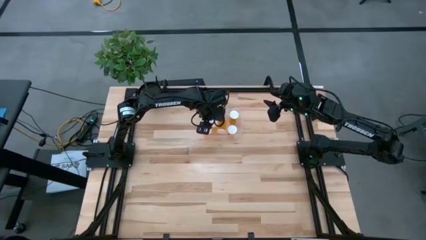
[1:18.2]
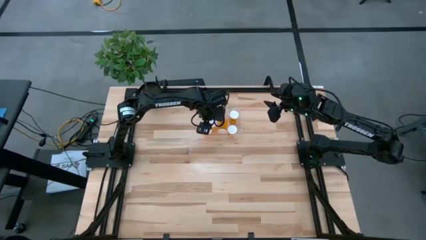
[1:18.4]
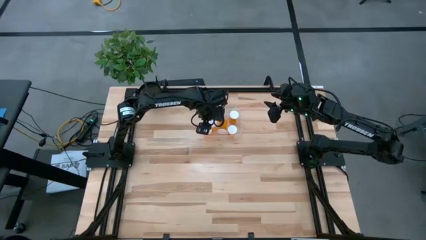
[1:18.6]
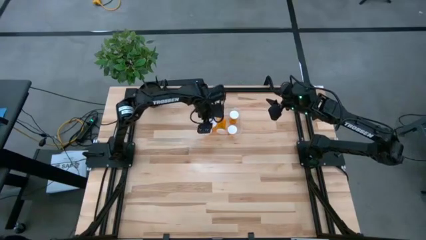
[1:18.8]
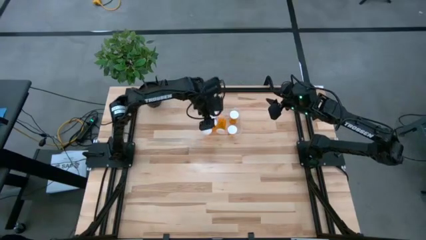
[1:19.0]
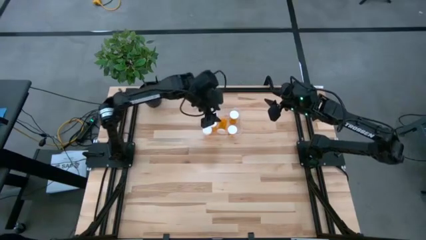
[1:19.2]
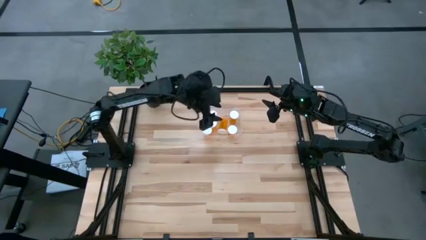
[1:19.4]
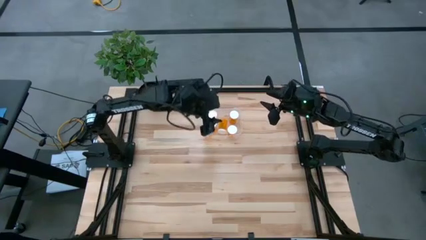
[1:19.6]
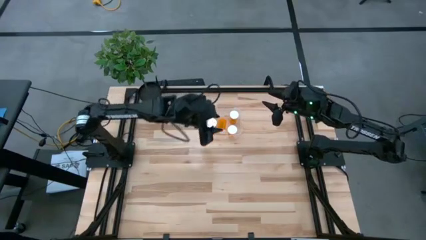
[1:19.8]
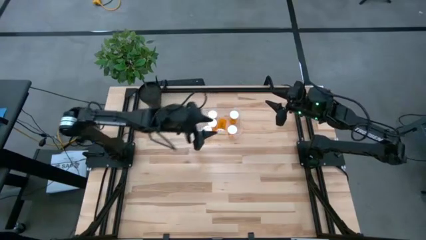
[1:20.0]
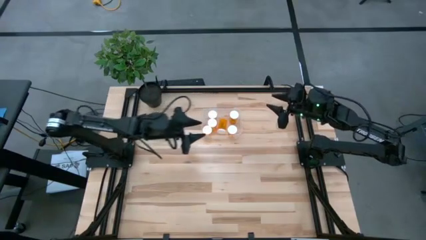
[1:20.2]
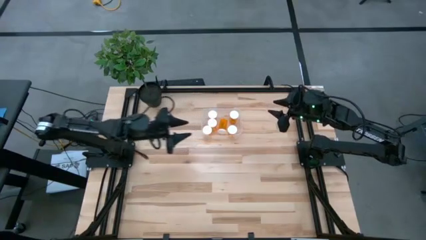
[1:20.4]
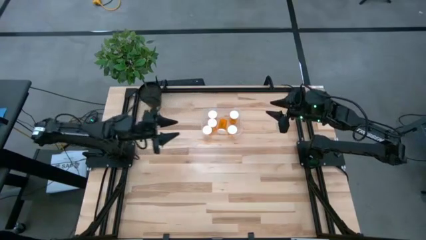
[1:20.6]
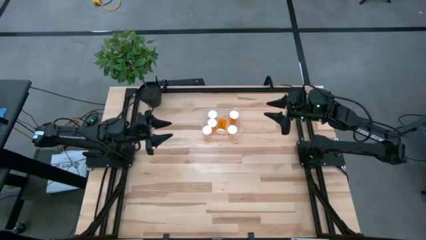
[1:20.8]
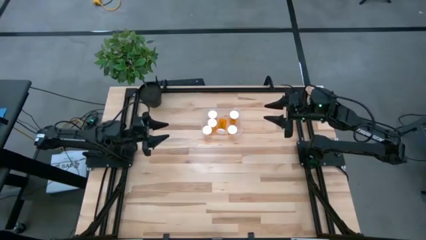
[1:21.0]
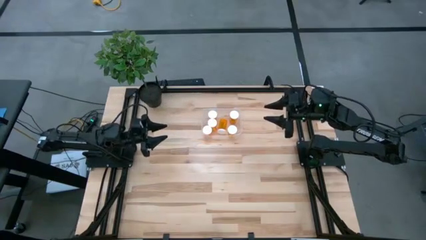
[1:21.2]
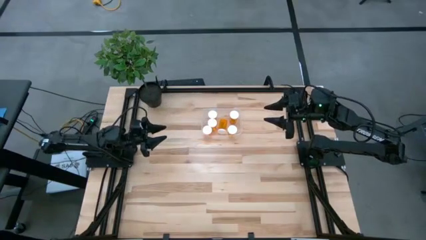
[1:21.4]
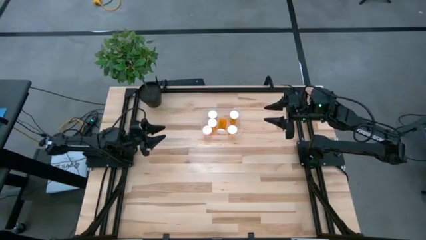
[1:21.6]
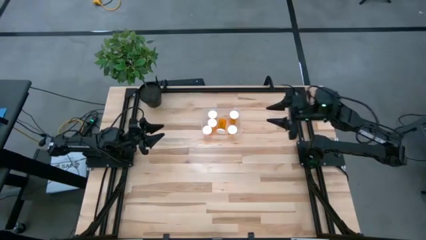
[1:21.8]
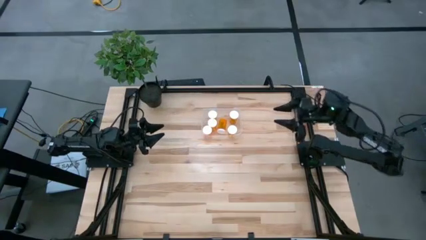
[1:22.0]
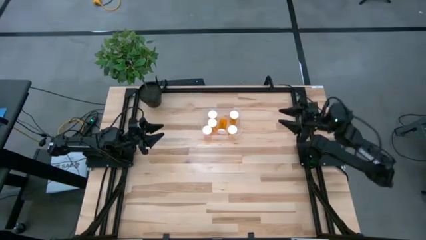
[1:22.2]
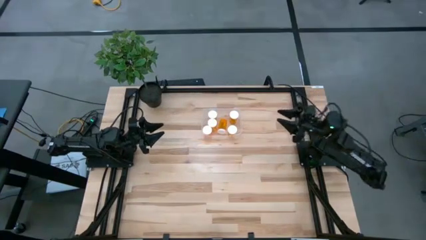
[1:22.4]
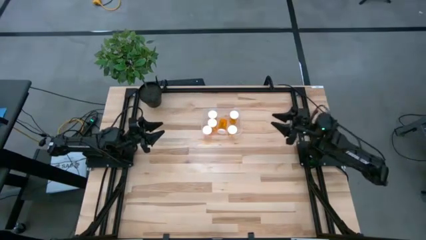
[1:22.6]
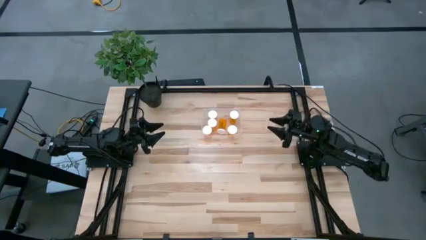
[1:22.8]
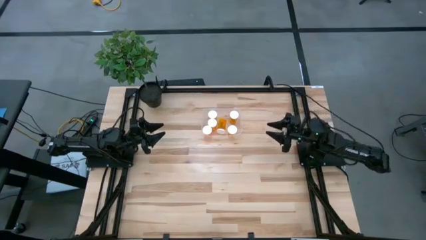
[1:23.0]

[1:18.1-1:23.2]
Task: Pick and place pill bottles into a basket
Return to Home Position

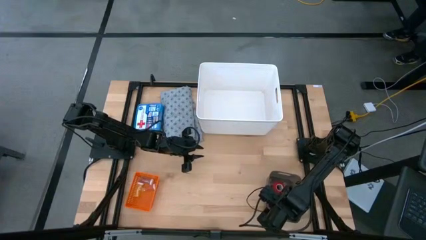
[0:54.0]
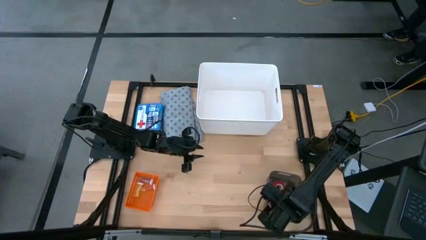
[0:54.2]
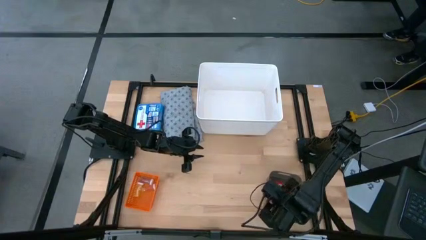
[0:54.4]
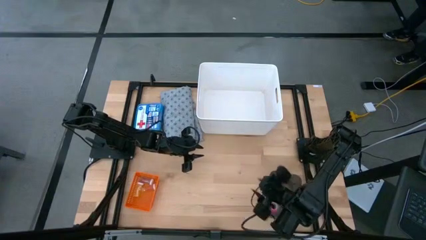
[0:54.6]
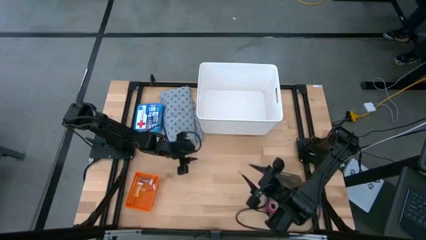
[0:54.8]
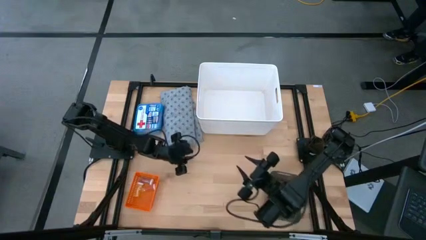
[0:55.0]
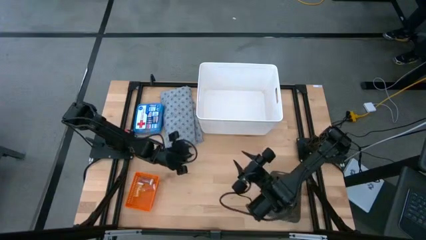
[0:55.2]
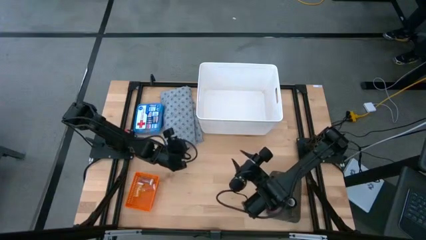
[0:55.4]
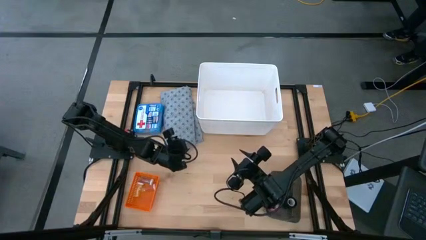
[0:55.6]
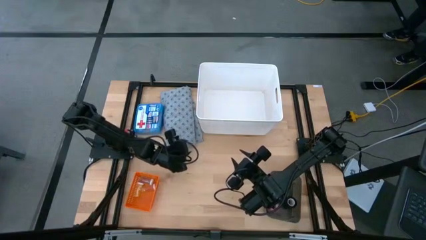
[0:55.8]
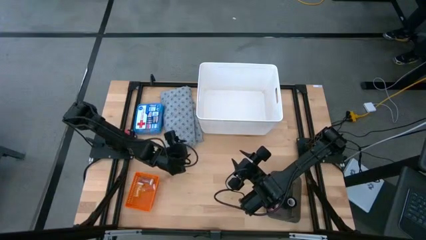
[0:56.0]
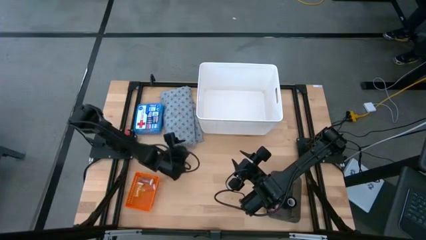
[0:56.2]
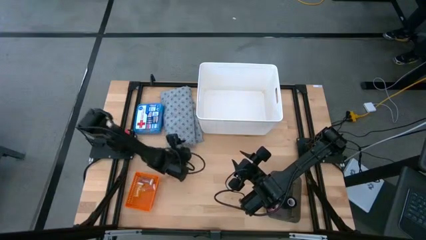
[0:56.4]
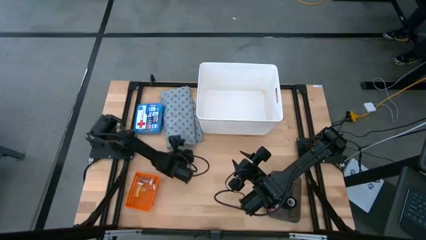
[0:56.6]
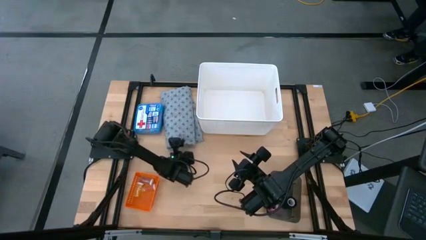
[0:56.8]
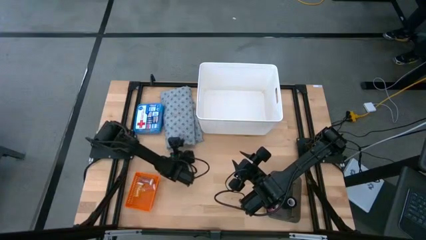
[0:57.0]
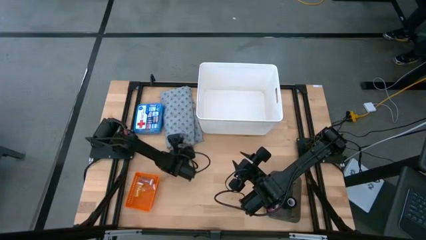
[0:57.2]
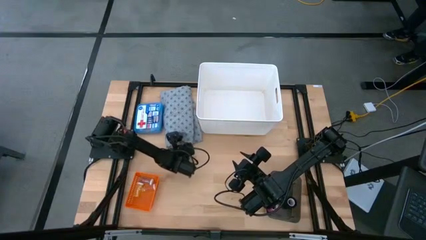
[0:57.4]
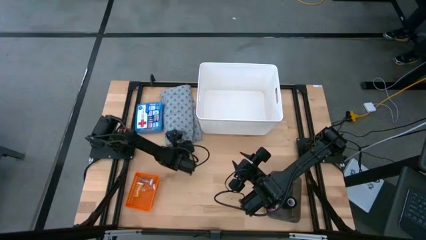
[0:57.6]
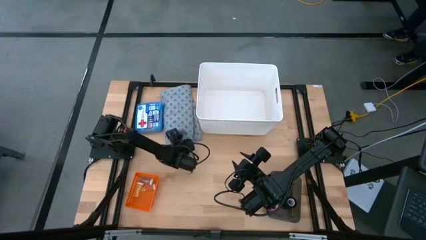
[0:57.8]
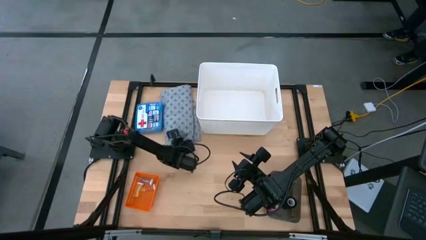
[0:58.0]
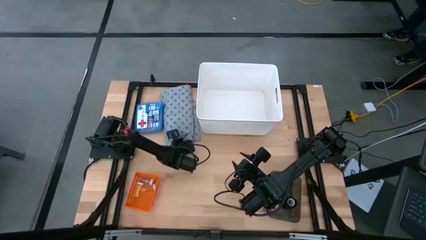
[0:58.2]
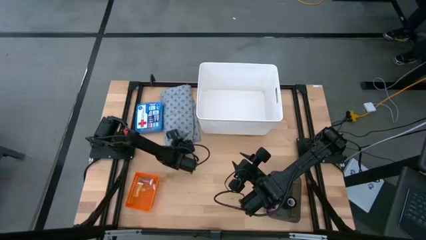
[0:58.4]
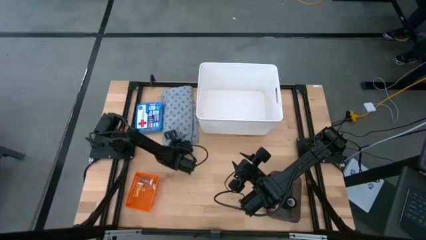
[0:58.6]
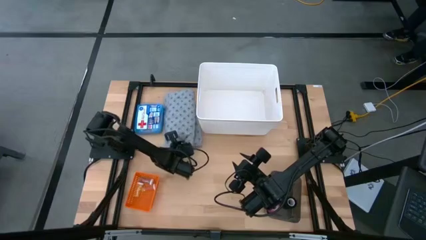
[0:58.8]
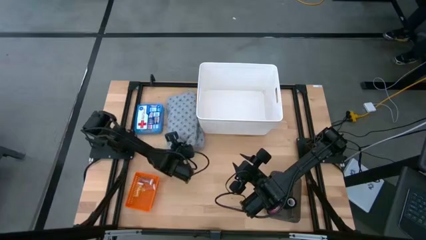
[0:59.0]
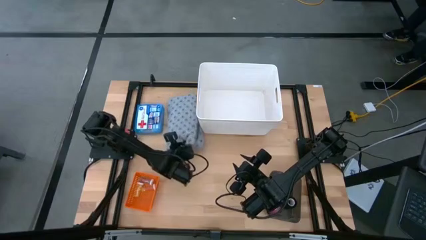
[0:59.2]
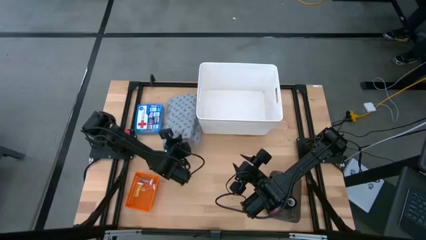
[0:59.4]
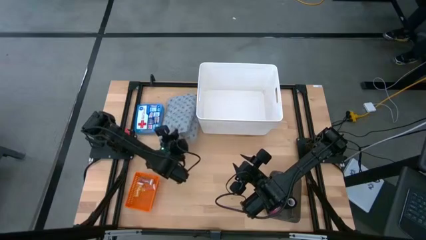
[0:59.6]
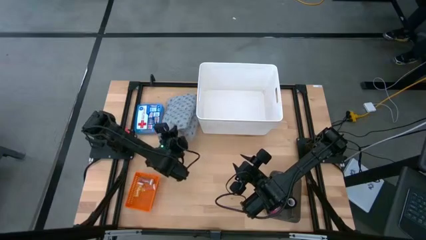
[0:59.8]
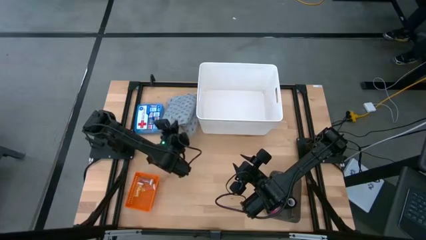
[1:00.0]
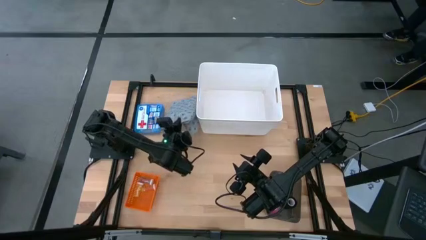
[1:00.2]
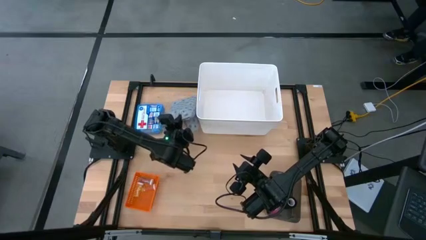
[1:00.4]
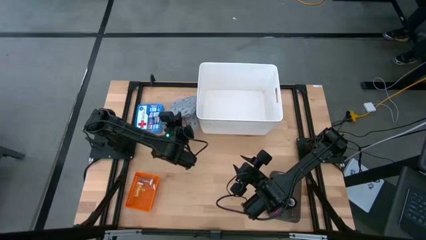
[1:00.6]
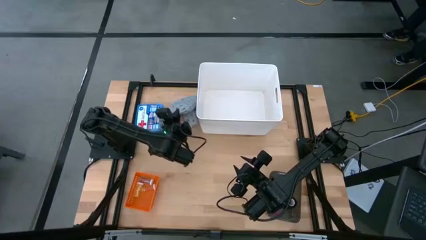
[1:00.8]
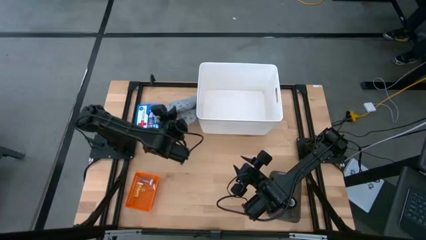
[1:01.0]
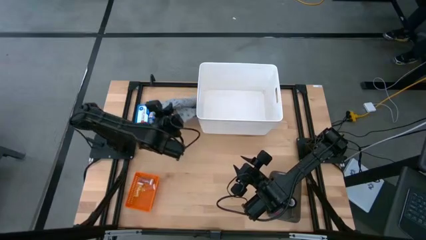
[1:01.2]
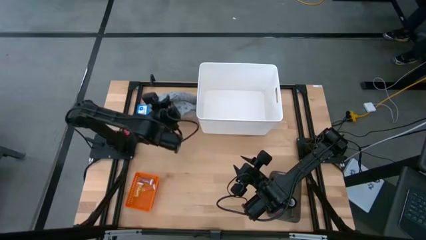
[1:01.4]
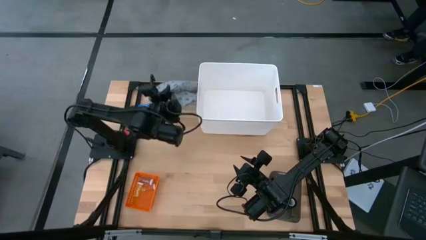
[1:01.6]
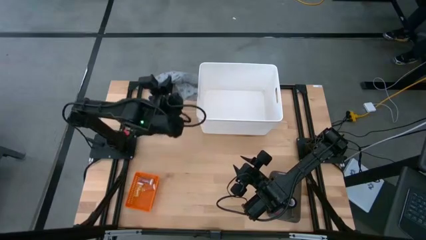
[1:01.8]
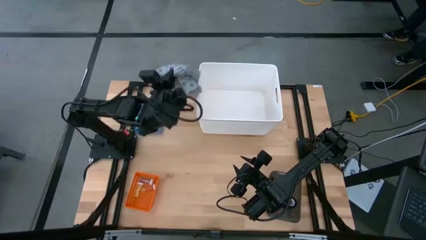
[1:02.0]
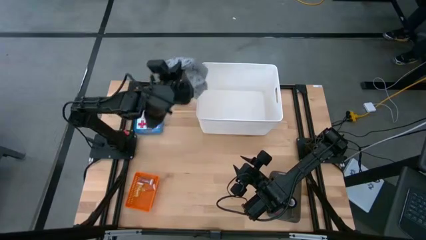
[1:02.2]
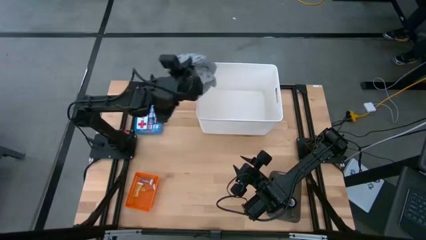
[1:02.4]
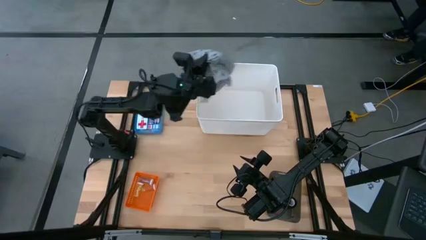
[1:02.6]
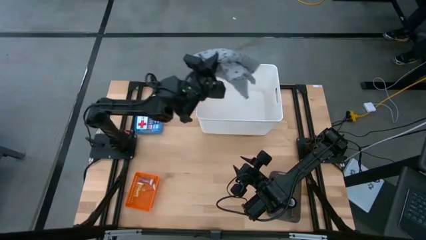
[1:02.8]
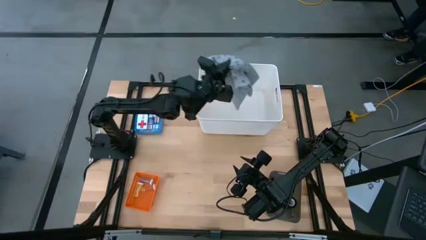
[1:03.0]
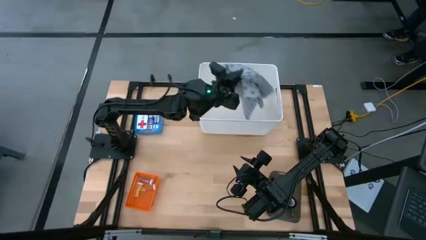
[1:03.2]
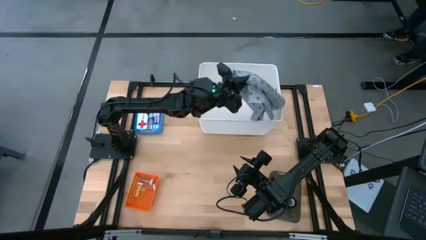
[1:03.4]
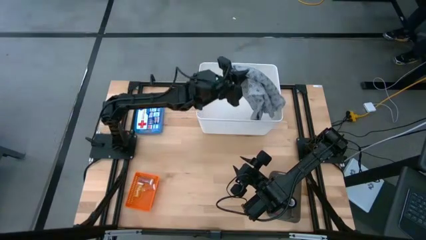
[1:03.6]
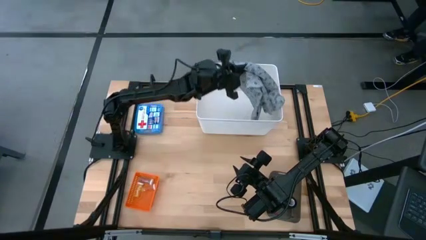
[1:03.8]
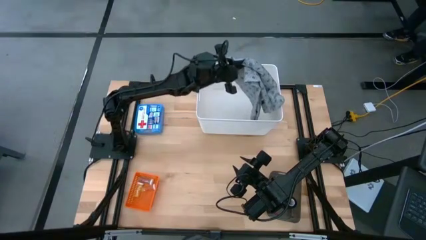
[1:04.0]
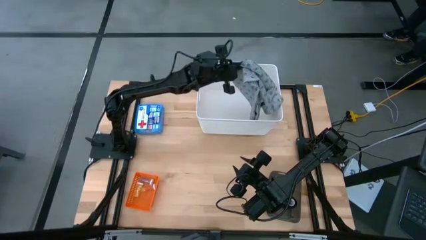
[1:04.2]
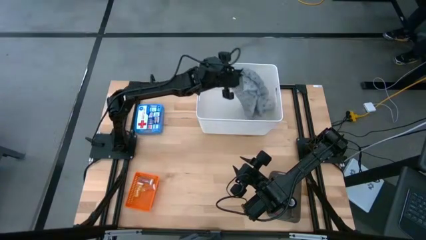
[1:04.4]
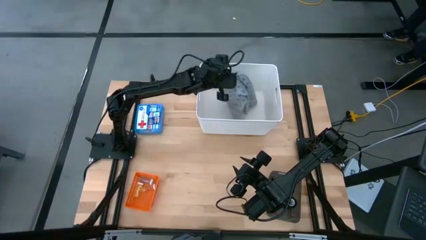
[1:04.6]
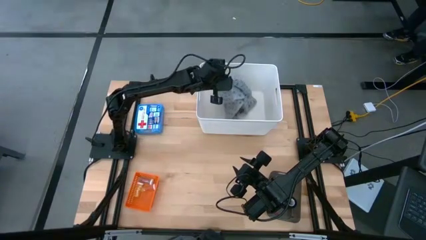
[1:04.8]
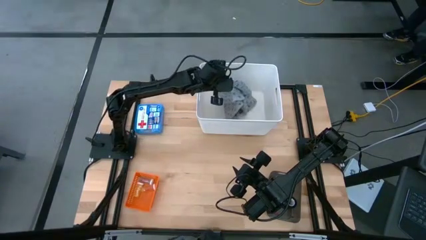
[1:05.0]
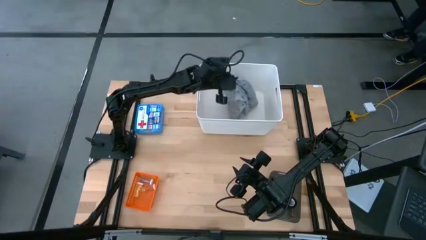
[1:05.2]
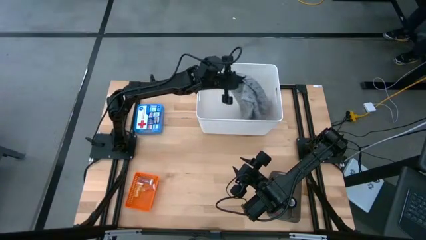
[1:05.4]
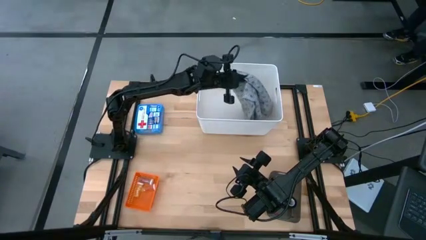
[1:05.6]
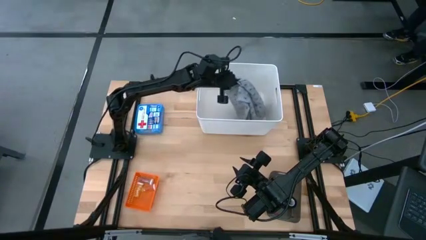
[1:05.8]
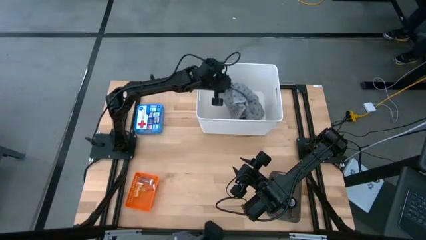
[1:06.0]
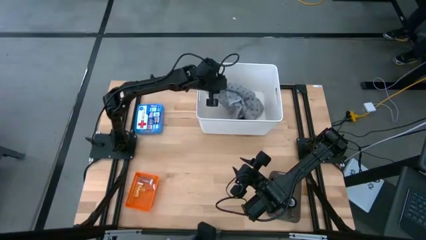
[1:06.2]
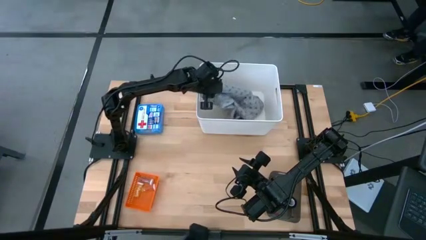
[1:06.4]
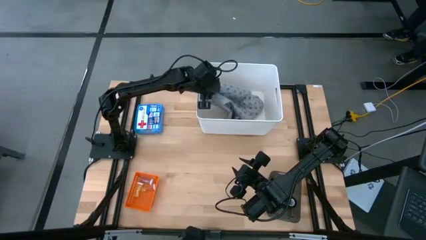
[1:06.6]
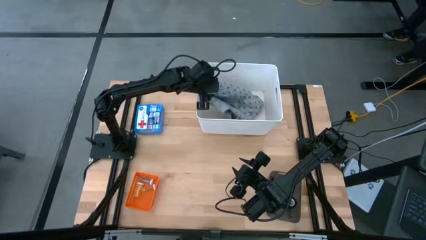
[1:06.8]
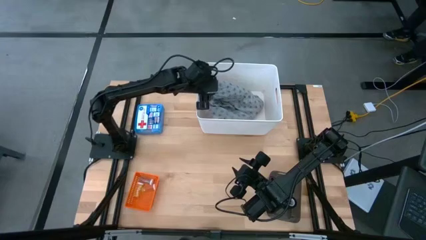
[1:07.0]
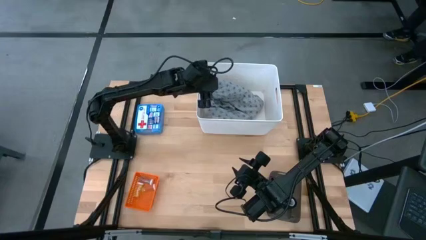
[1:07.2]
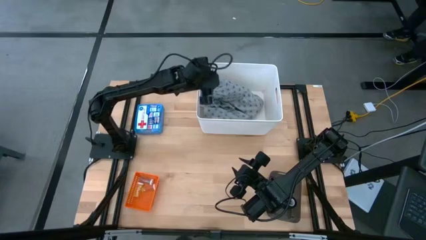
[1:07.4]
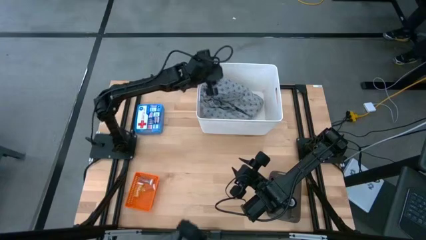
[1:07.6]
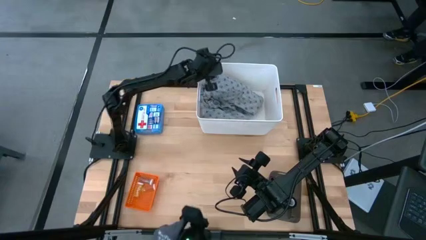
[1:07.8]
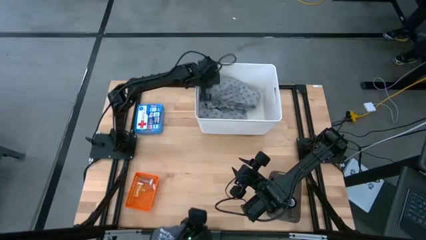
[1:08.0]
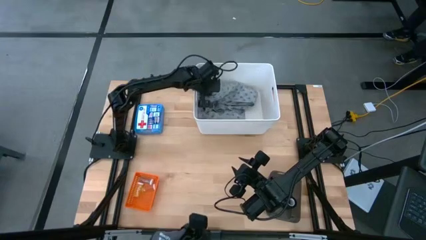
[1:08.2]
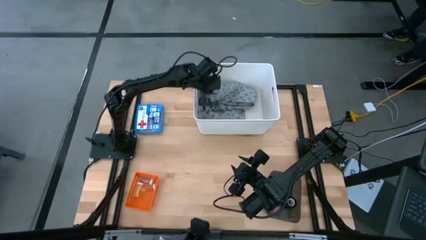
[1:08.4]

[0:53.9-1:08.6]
Task: Pick & Place Medicine items
Put the gray patient gown into the white laundry bin
